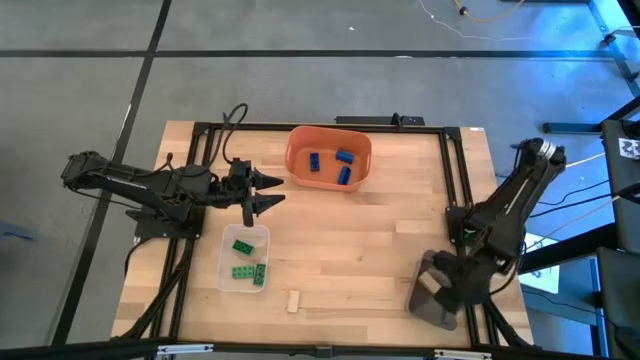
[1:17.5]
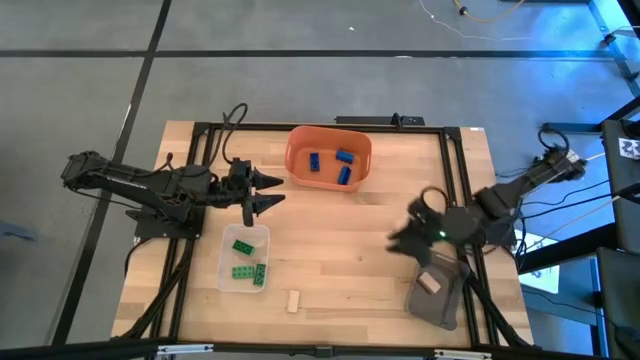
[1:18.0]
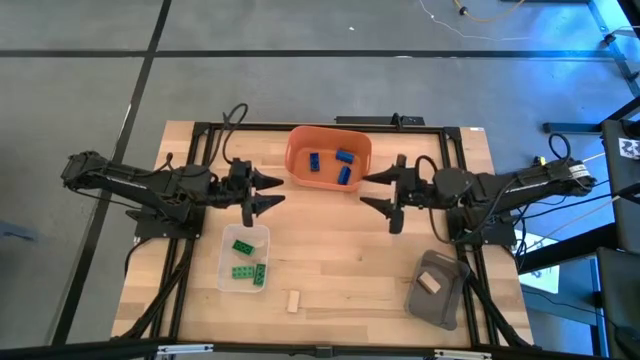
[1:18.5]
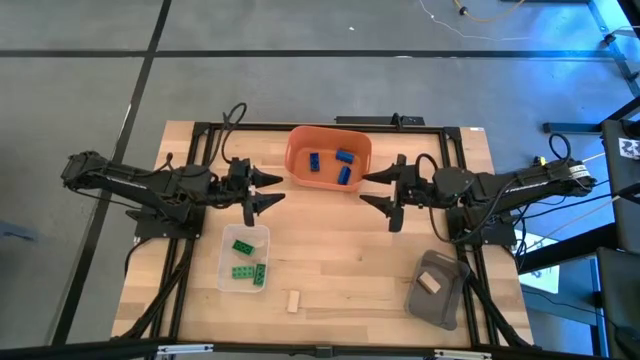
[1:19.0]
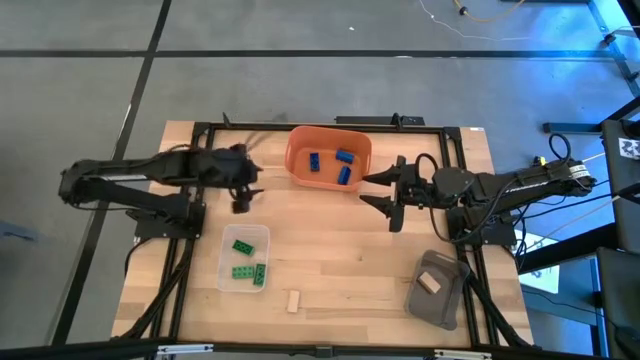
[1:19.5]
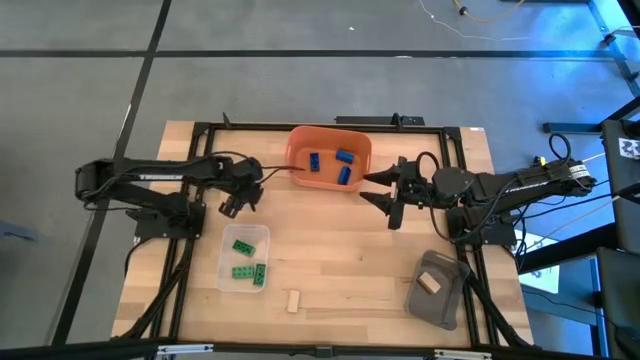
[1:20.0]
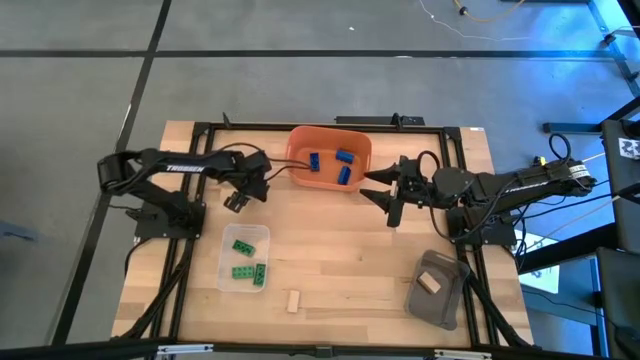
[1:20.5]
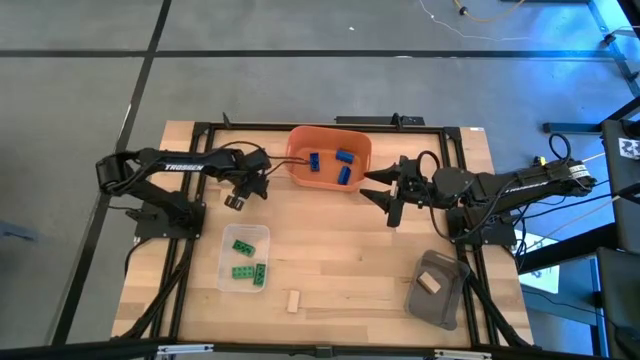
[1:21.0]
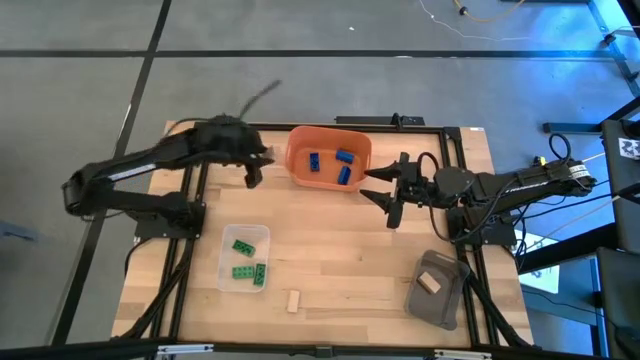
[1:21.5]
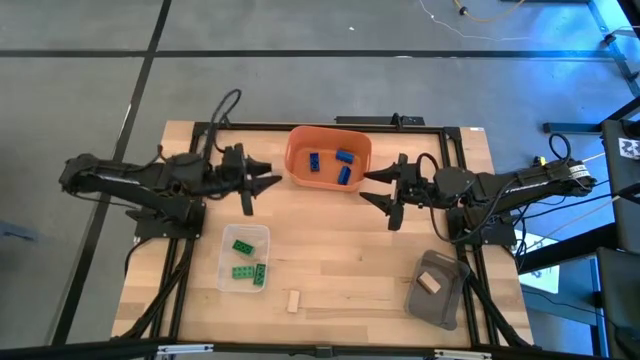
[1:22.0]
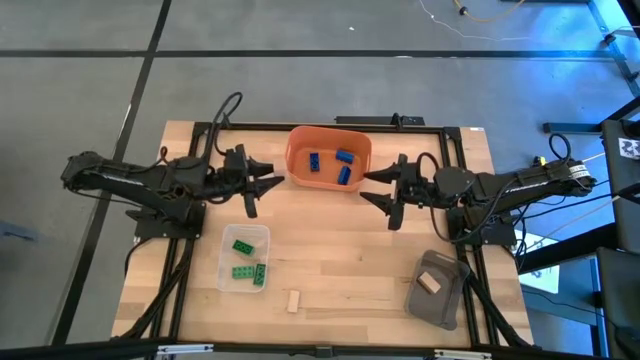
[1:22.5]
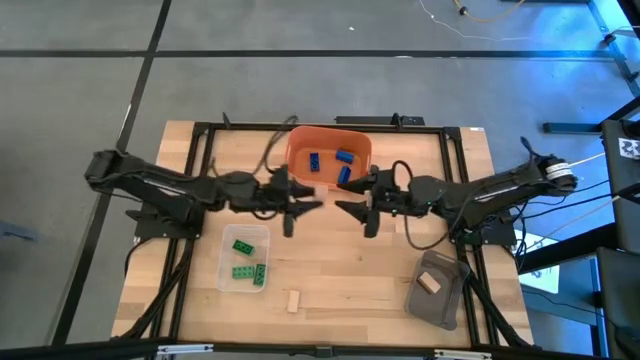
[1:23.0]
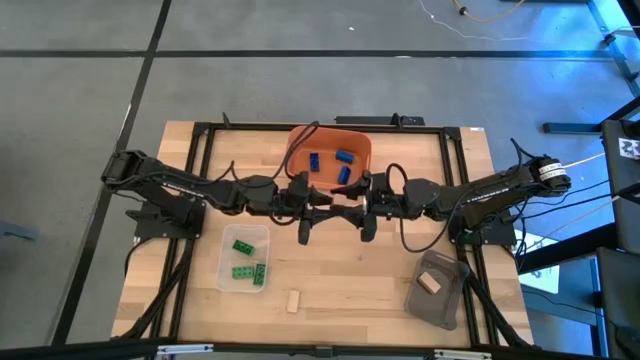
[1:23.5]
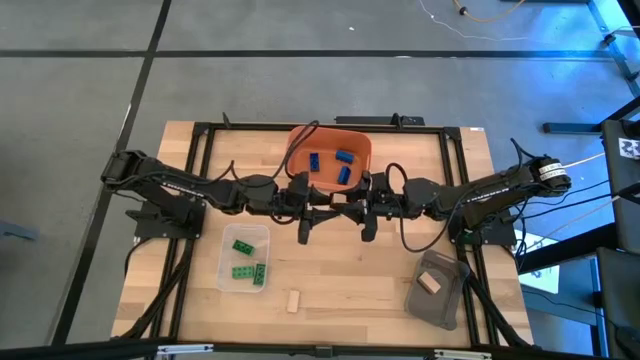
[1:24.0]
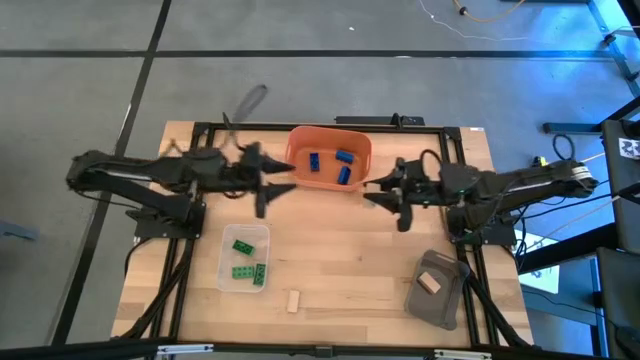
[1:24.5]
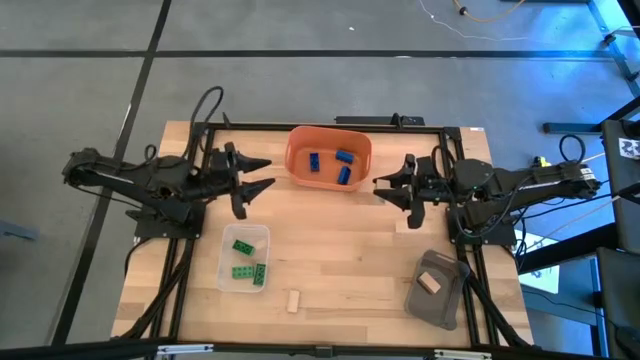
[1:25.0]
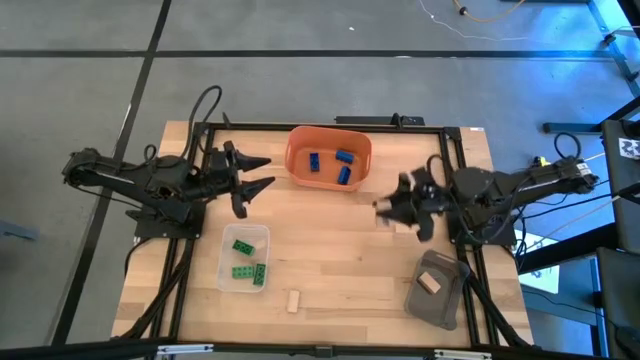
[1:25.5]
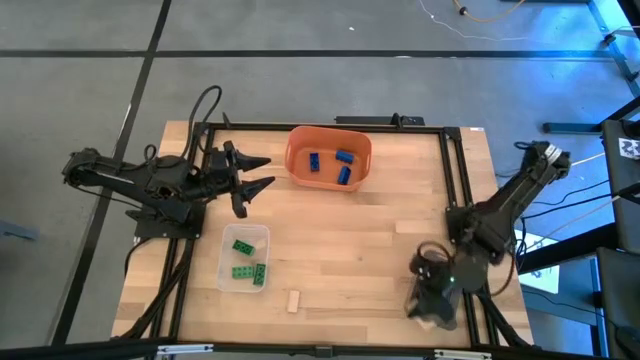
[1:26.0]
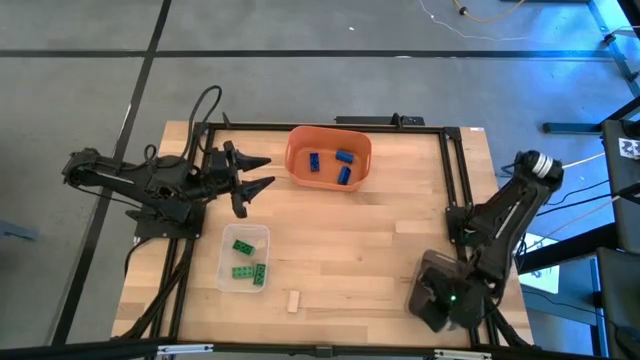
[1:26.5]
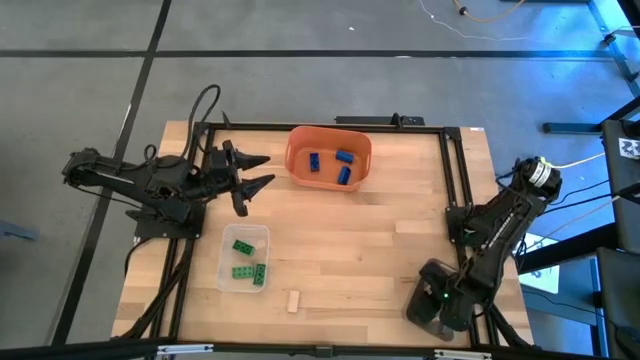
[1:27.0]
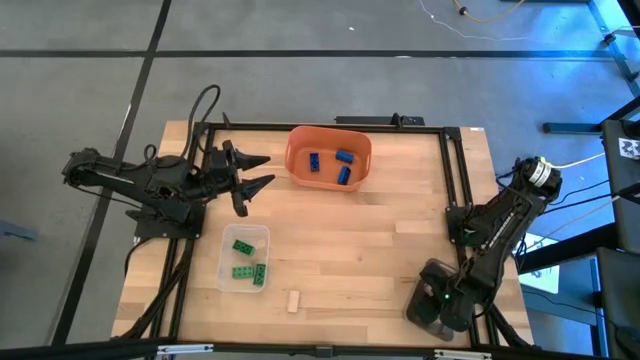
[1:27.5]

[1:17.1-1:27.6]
Task: Sort & place blocks by color
Put the top brown block into the black bin

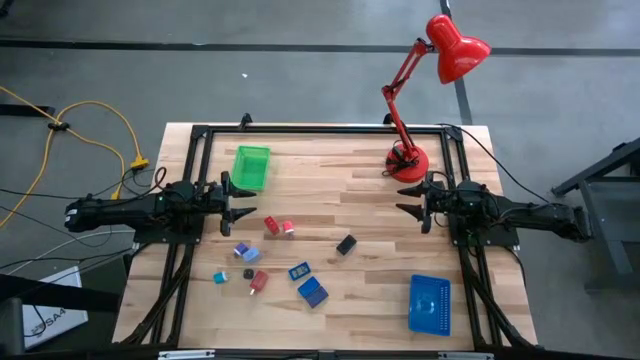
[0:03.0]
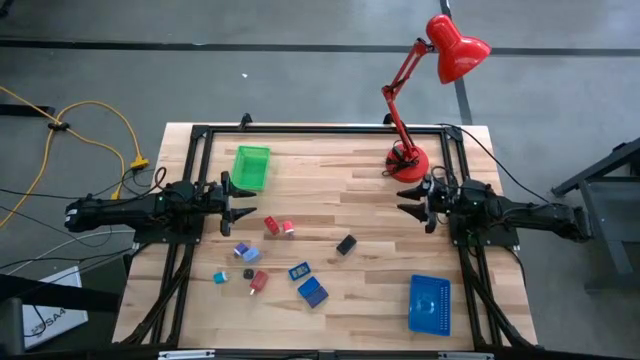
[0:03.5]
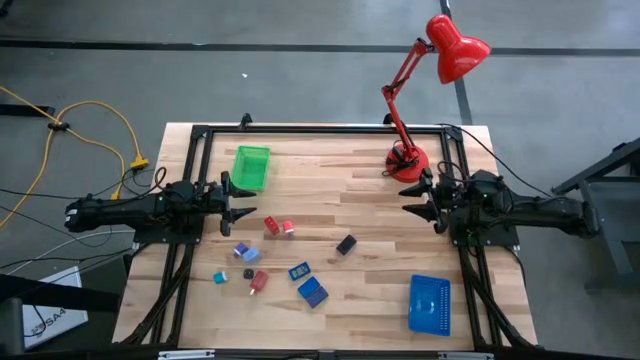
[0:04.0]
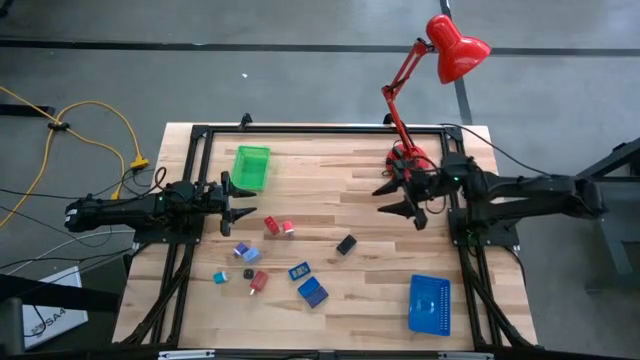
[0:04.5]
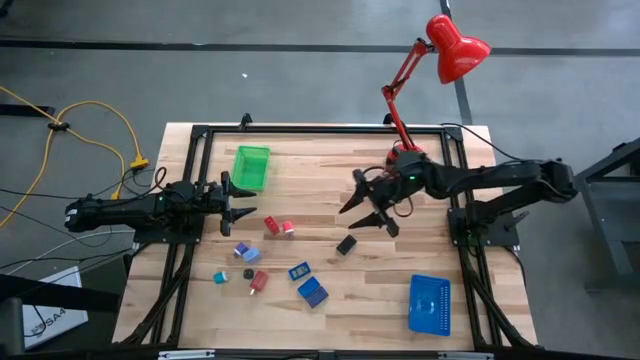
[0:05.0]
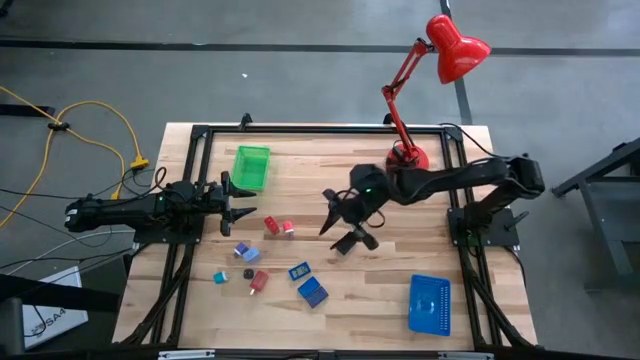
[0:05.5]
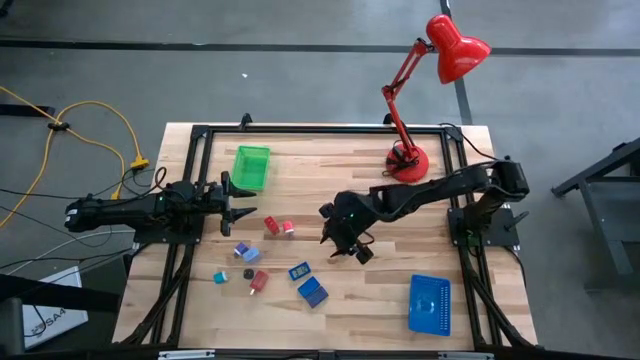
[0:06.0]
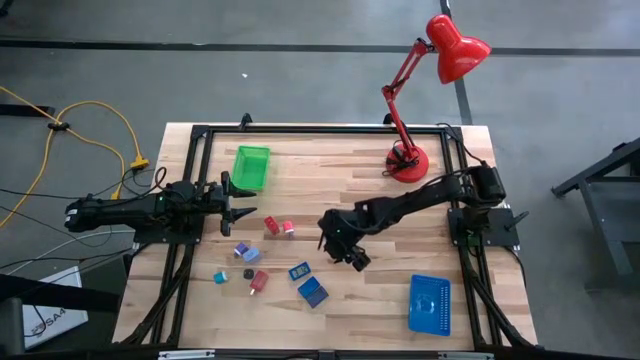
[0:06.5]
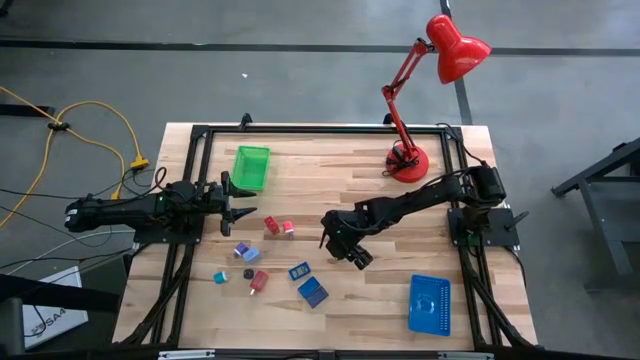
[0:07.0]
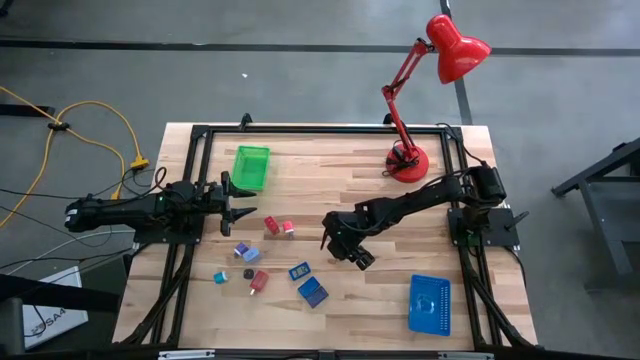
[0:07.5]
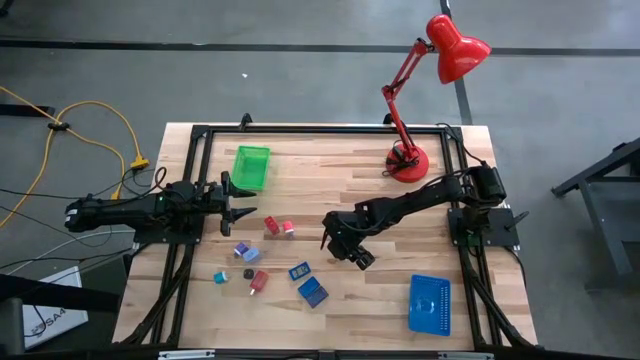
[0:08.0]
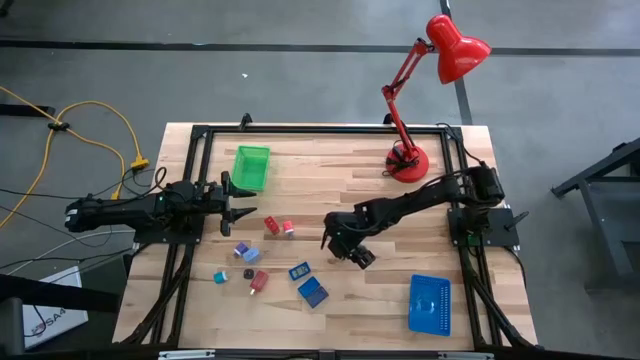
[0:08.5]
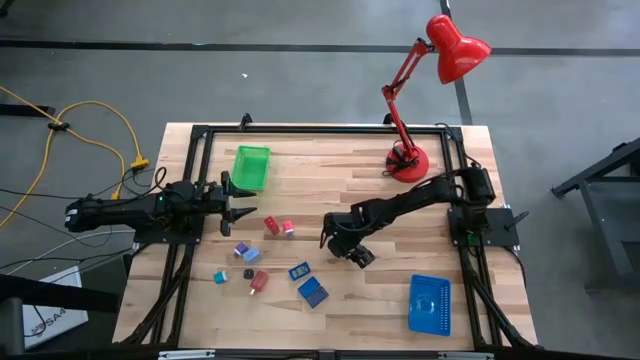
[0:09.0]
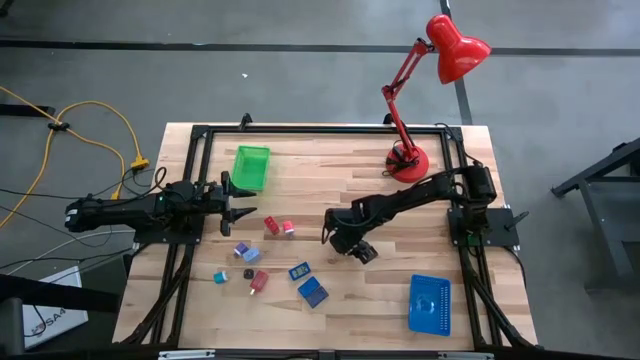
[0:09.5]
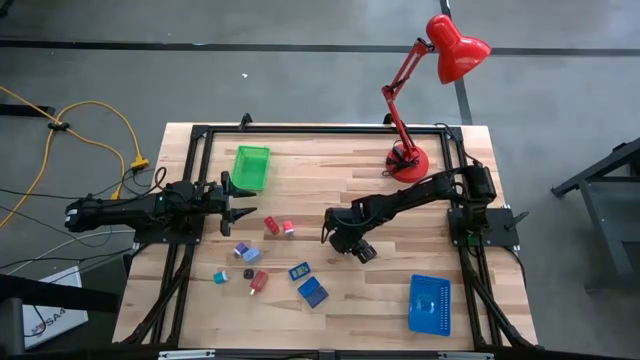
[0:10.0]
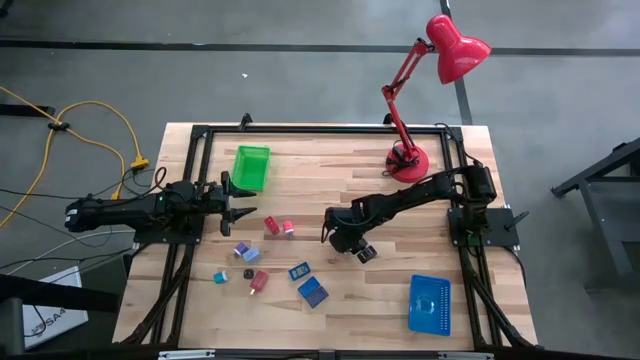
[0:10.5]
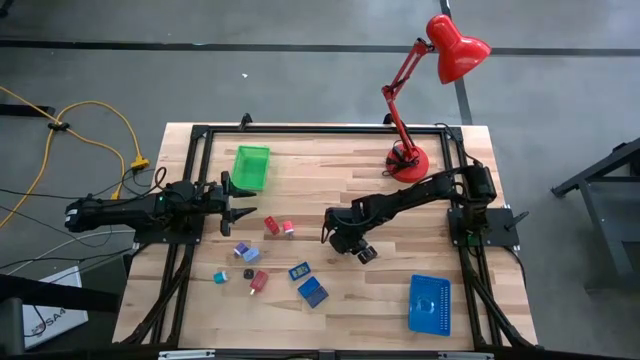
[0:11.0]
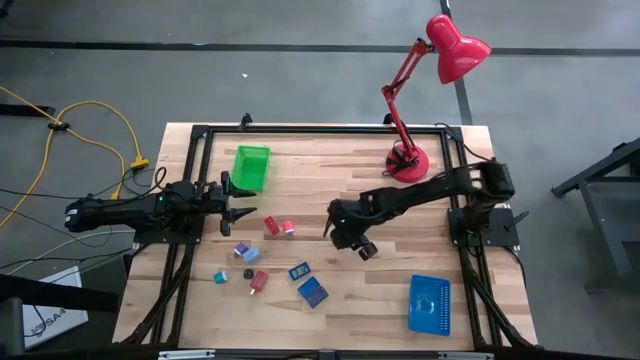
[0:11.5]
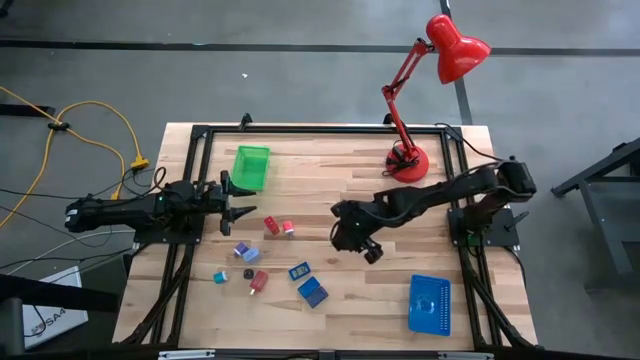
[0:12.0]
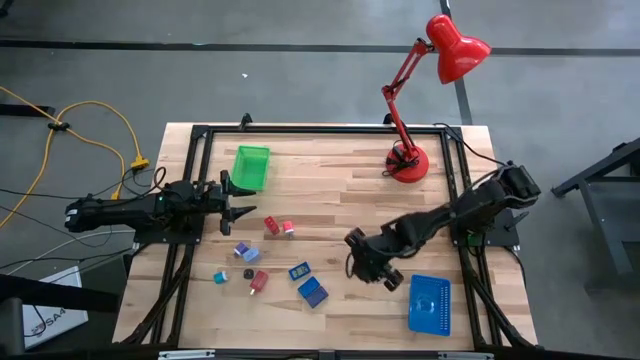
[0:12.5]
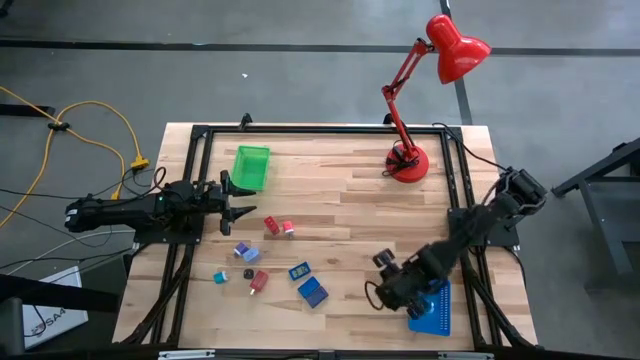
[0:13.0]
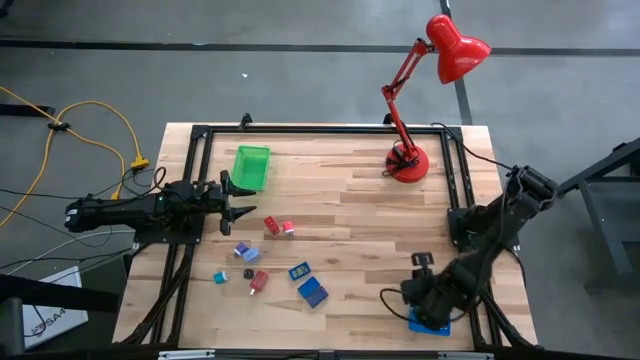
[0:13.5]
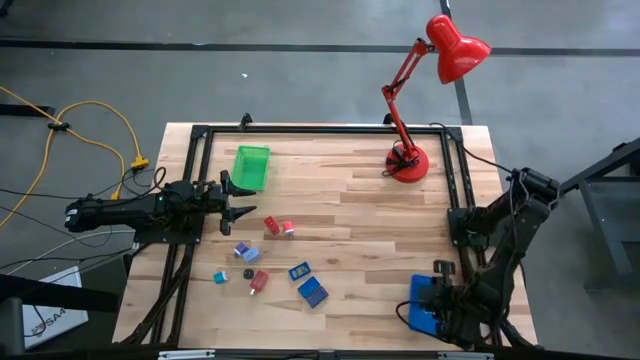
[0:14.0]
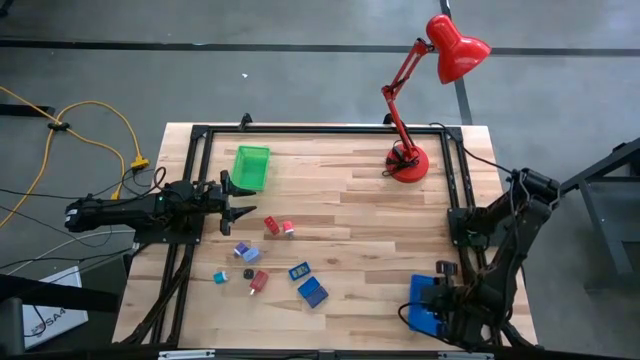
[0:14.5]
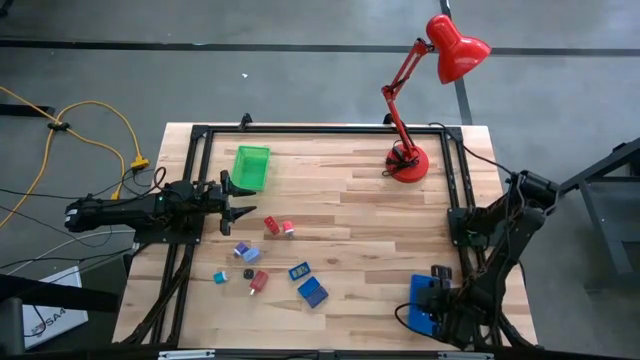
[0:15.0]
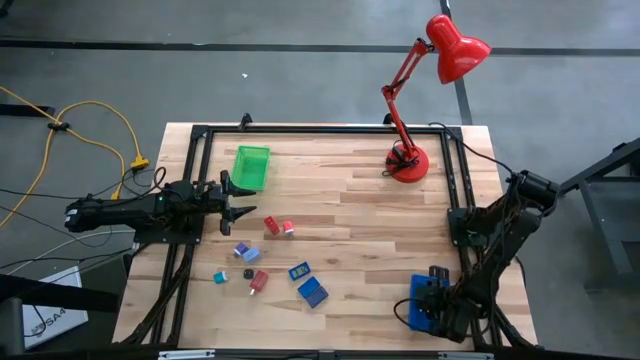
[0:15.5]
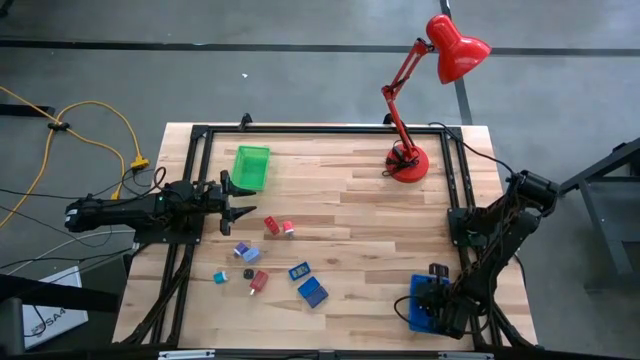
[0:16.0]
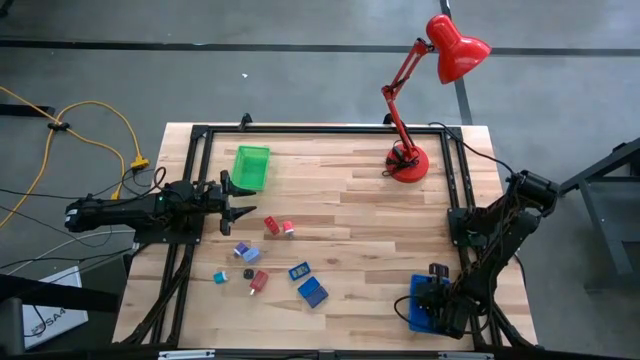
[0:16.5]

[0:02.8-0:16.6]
Task: Pick & Place Office items
Put the black digital timer into the blue bin
